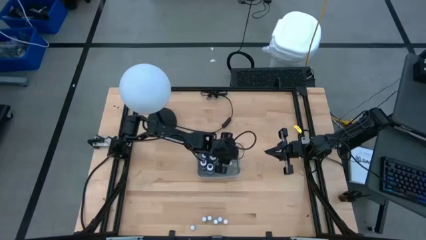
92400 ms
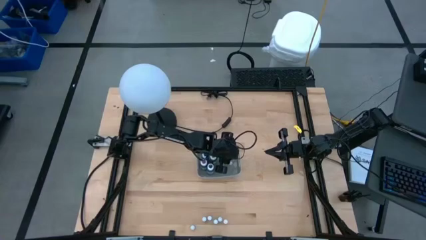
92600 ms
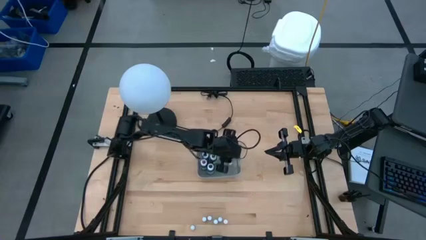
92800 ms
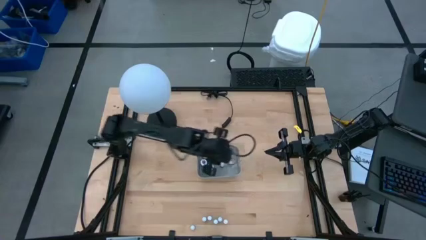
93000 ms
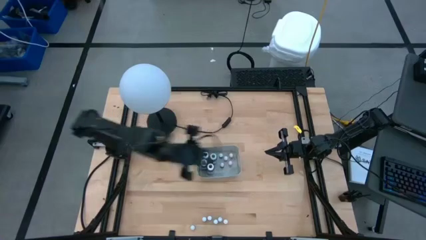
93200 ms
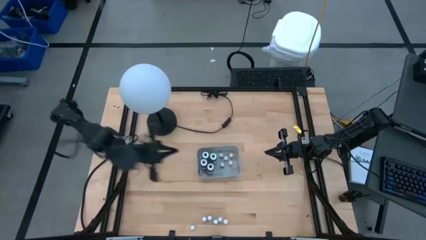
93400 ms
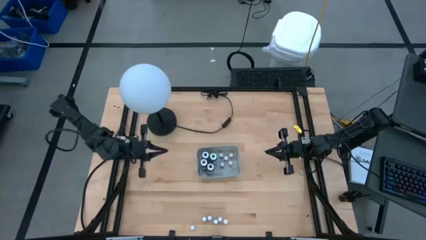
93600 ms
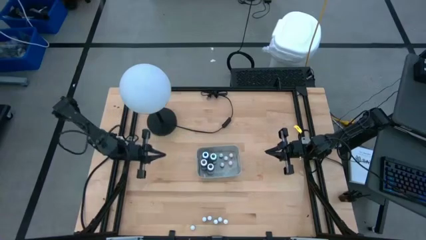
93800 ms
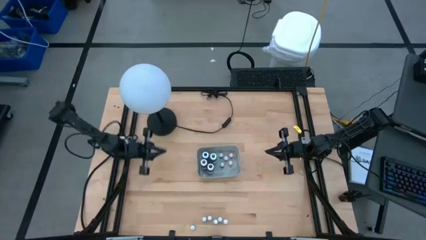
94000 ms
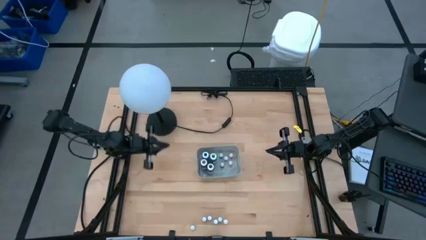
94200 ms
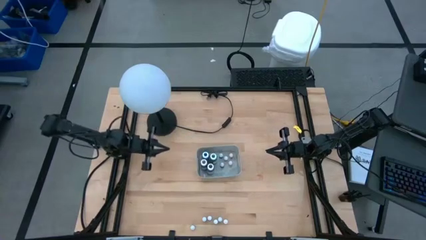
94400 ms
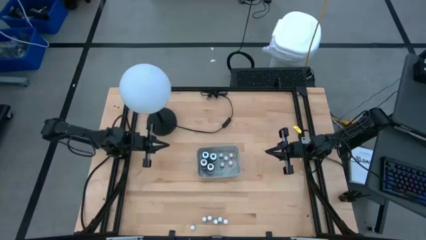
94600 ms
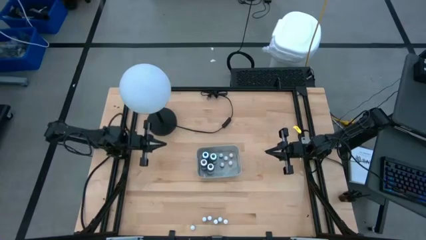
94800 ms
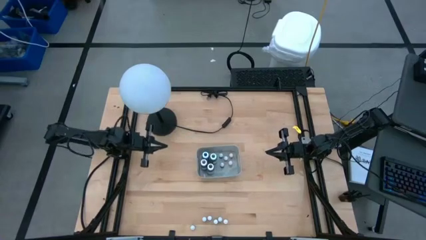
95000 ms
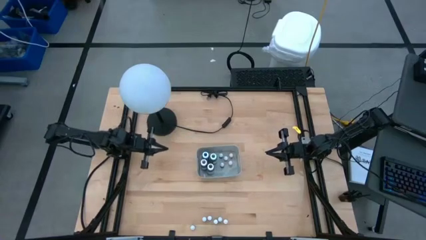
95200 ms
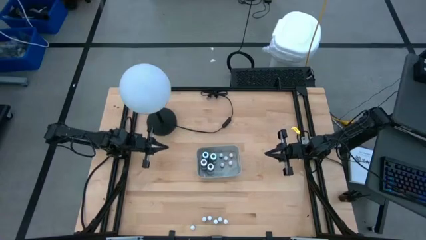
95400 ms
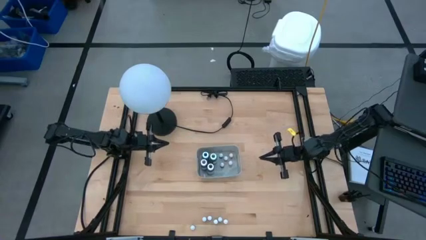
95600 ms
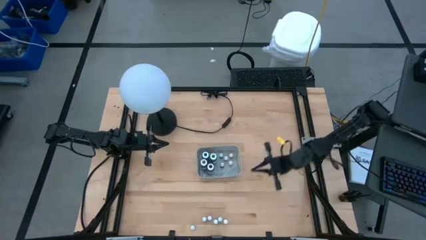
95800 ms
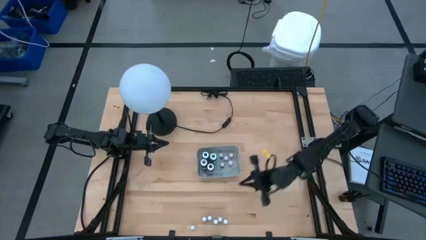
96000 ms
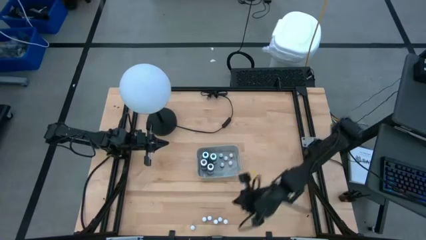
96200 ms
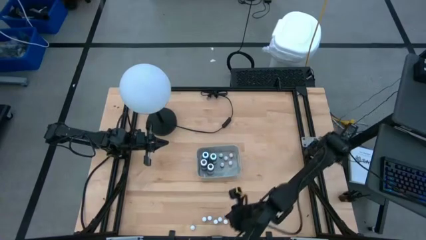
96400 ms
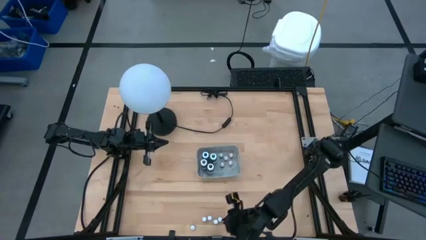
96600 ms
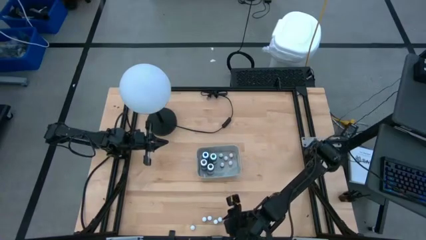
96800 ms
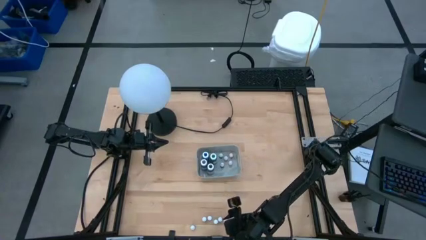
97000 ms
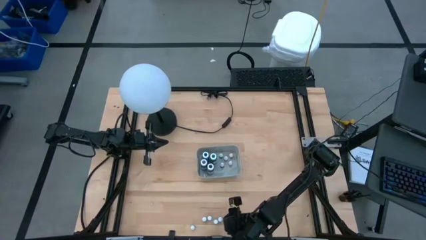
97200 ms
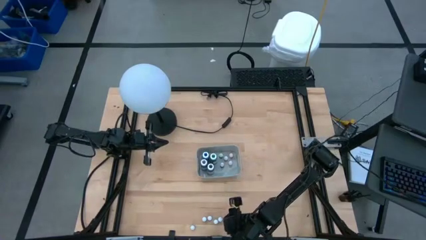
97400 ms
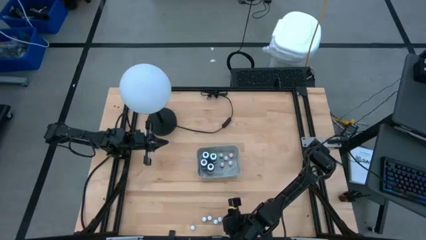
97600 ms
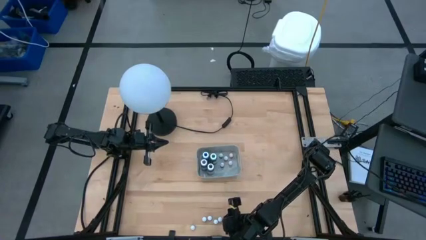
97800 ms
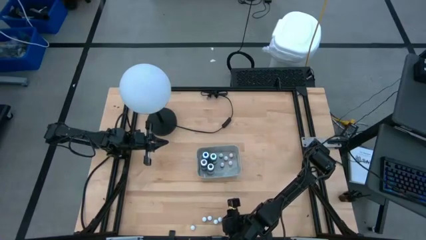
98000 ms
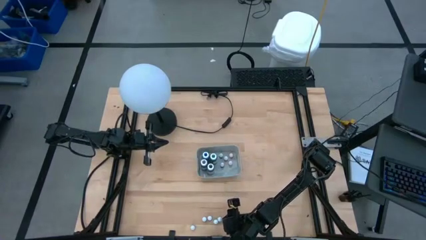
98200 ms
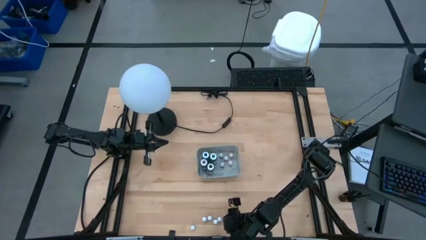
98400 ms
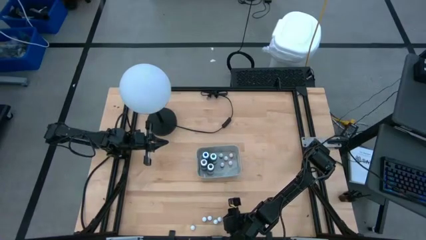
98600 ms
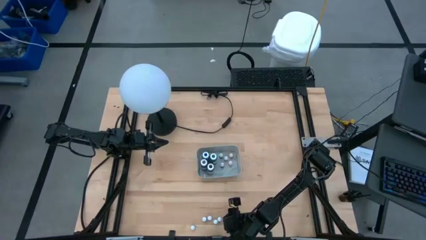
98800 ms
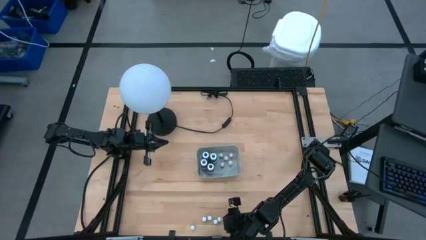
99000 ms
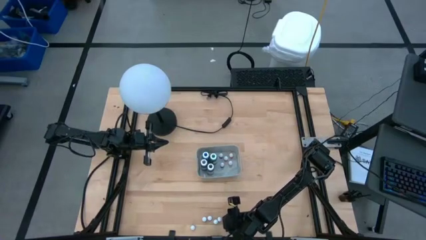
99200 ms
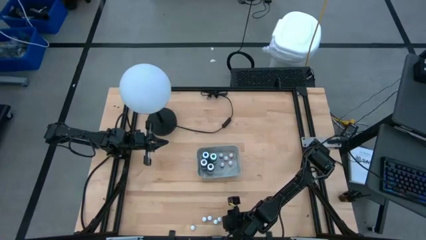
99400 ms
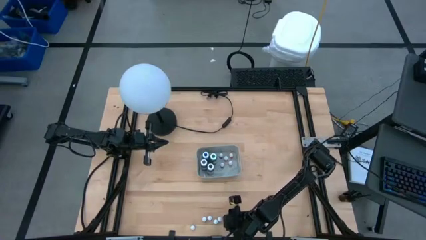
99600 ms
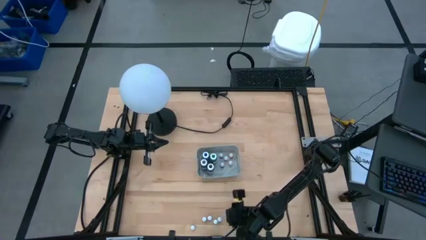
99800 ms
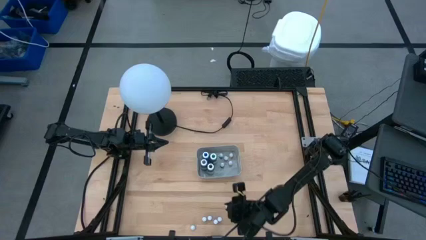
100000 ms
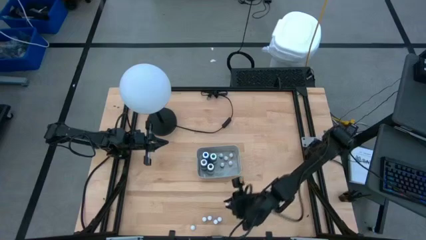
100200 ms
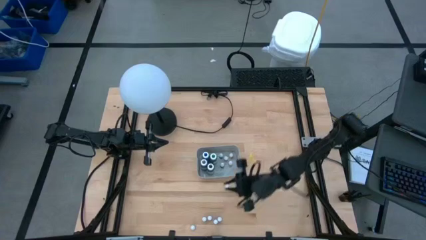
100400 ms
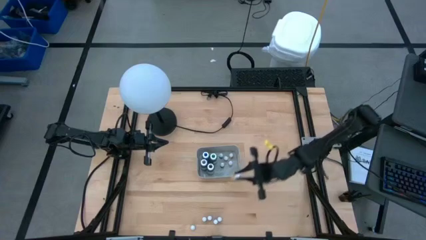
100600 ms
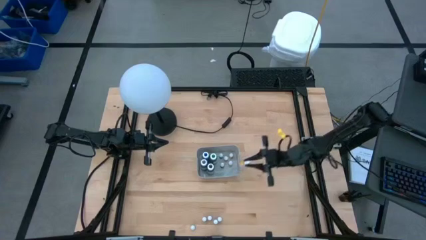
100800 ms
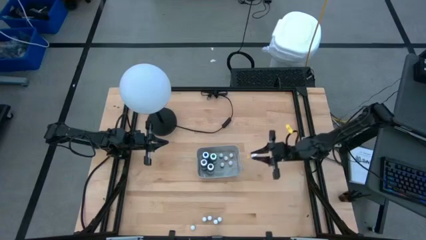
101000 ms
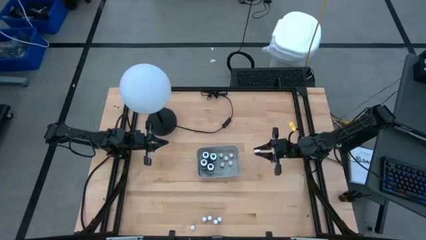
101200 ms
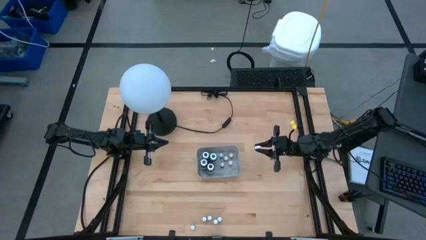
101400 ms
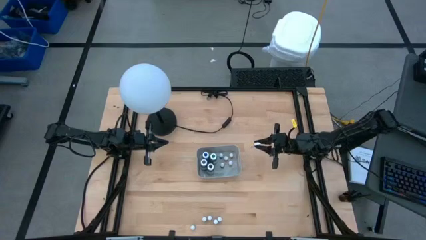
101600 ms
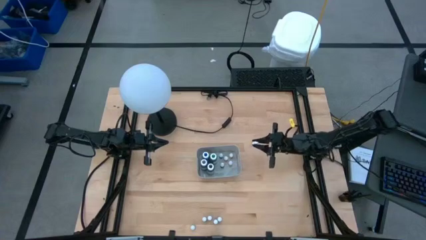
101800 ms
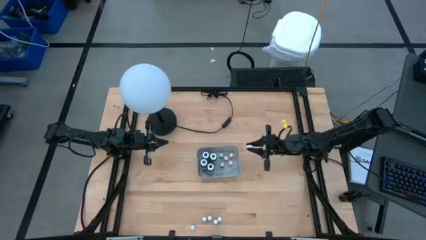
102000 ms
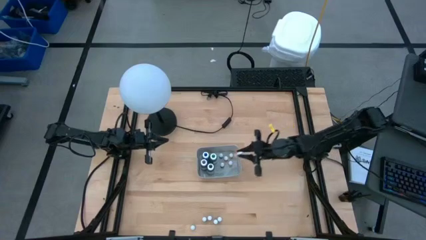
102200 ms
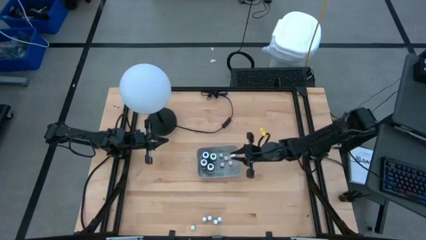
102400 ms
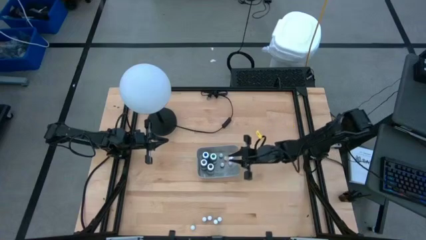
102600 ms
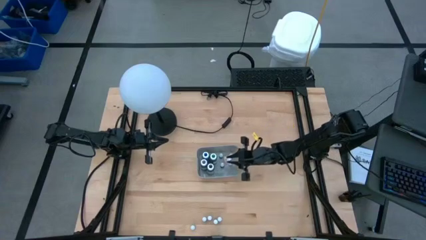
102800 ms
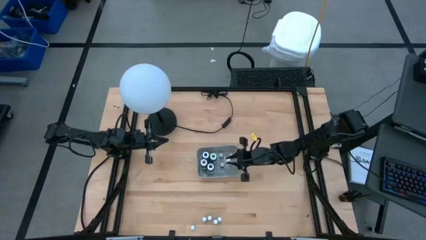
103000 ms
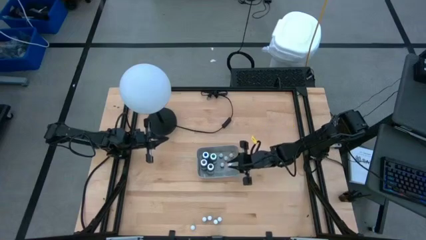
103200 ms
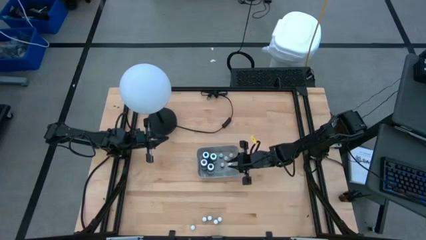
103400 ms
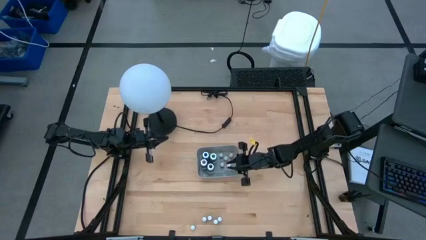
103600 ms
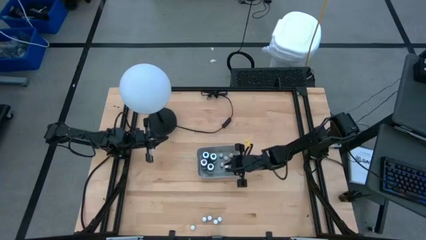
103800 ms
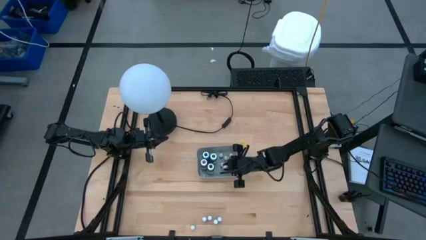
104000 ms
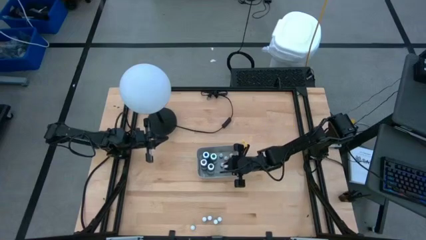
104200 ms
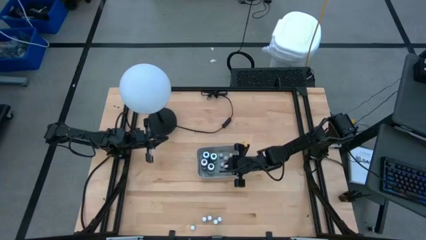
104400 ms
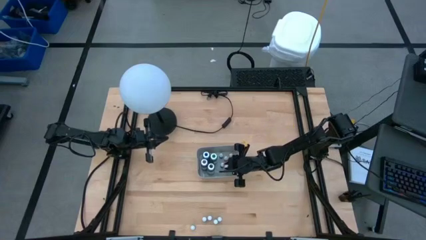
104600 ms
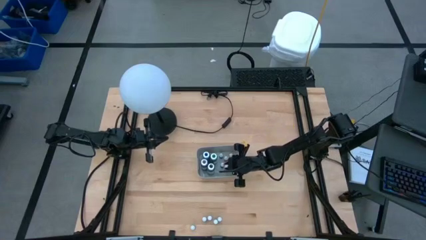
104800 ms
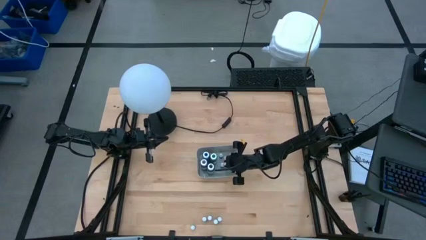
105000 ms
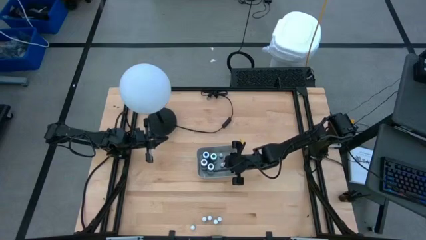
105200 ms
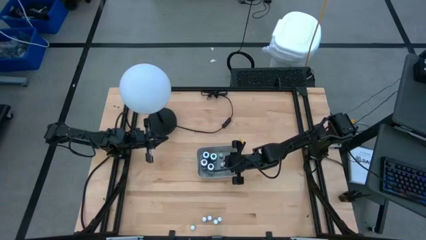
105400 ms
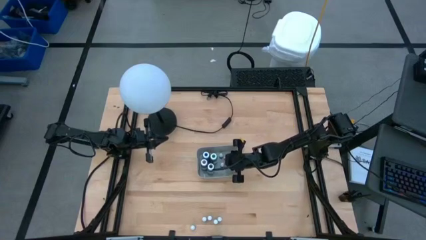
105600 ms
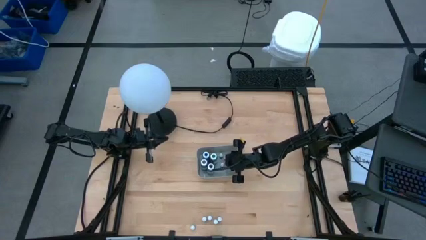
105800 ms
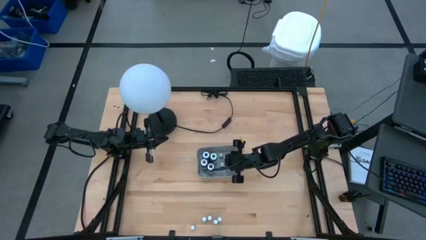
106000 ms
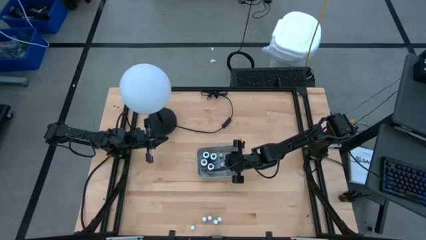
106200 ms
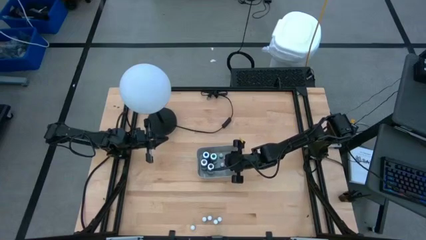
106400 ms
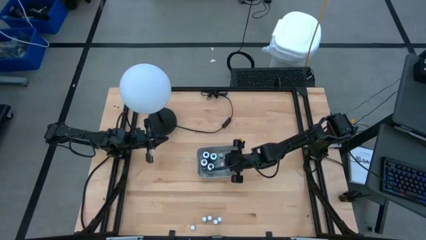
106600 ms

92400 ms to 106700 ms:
Task: Pick & Place food coloring
Put the small orange food coloring bottle into the gray bin
